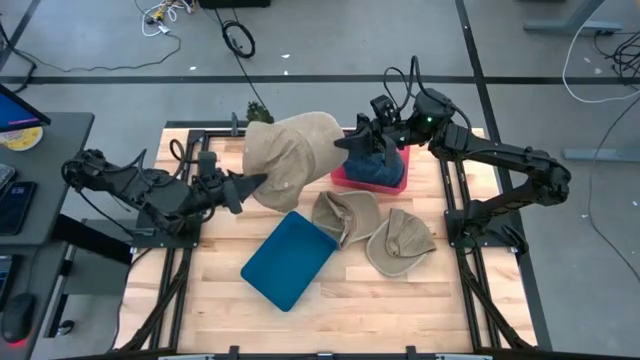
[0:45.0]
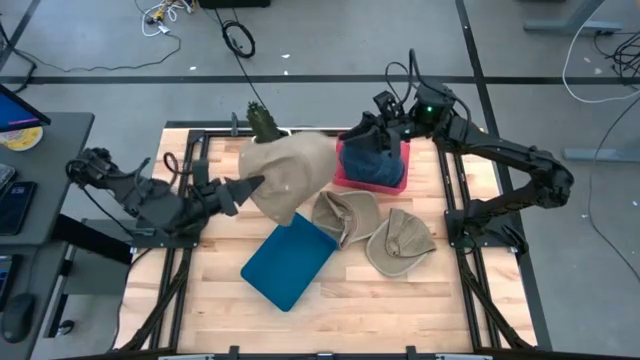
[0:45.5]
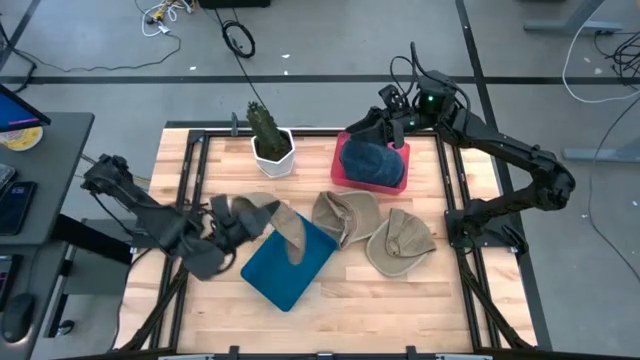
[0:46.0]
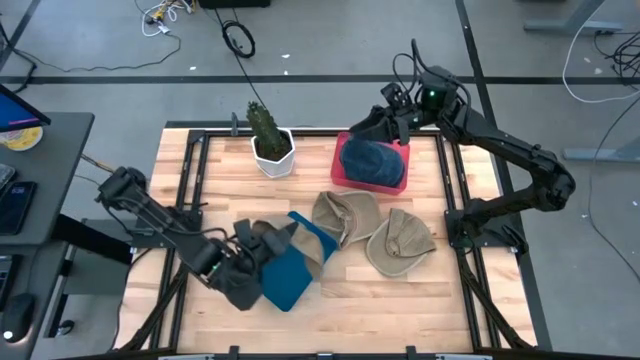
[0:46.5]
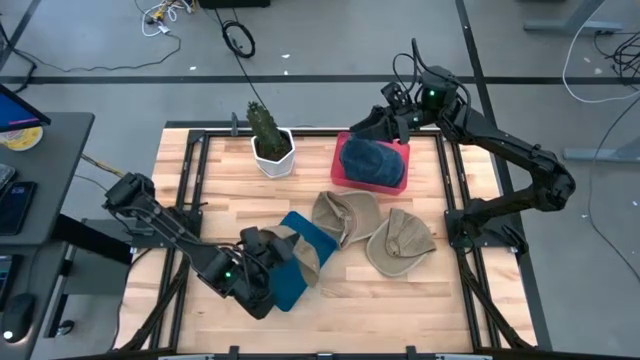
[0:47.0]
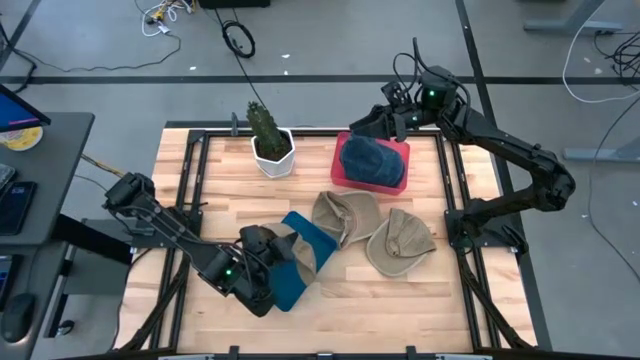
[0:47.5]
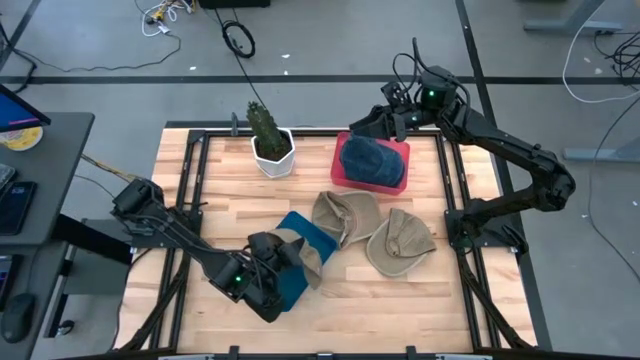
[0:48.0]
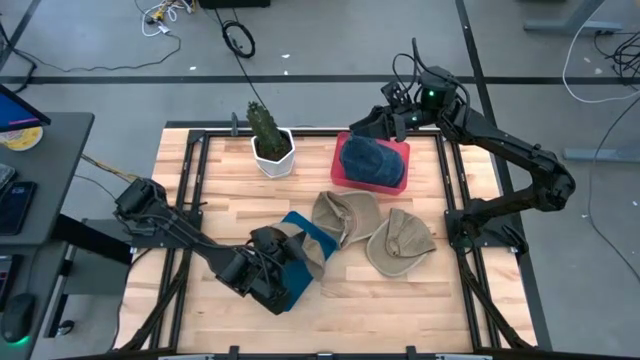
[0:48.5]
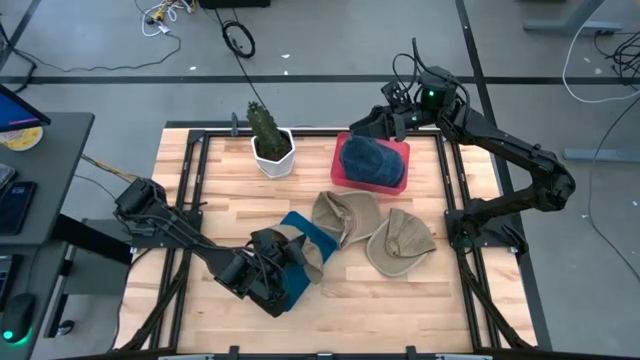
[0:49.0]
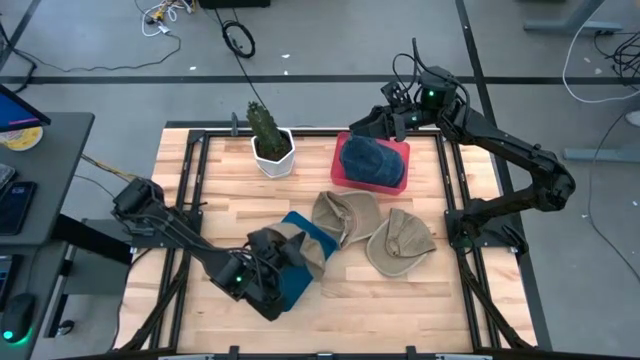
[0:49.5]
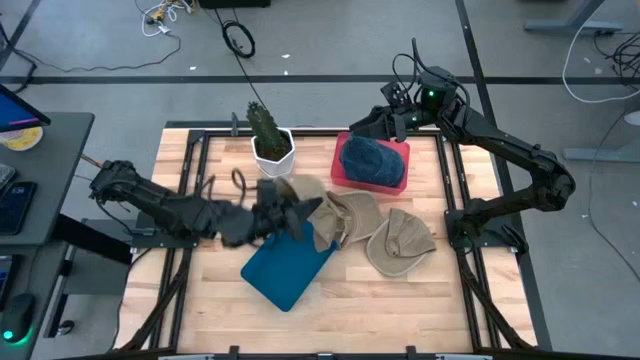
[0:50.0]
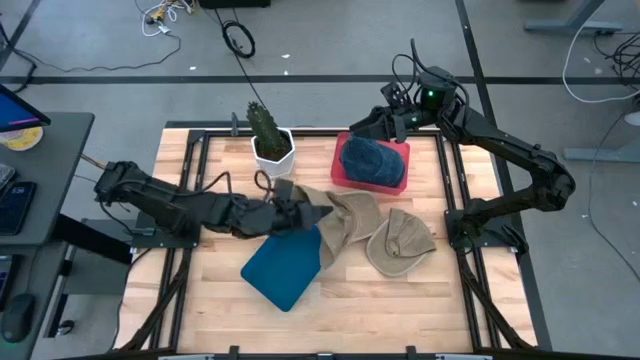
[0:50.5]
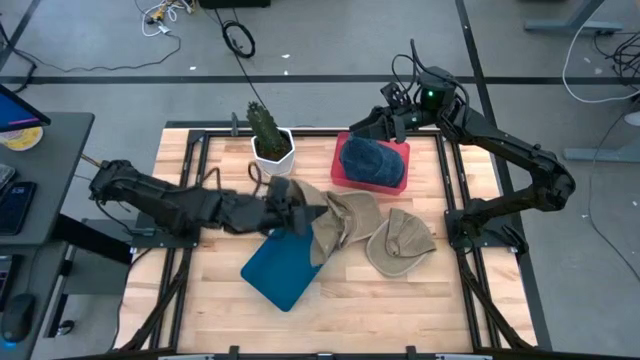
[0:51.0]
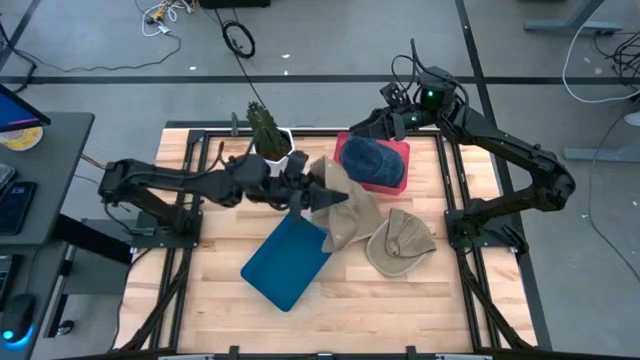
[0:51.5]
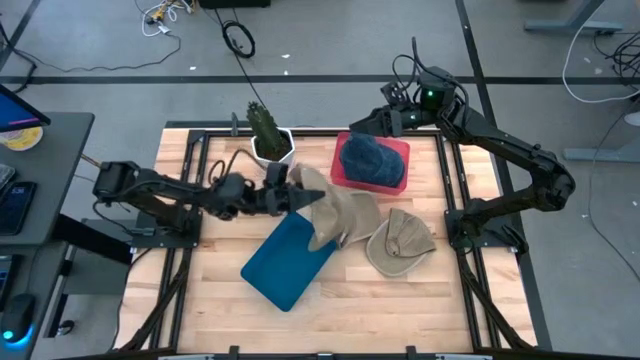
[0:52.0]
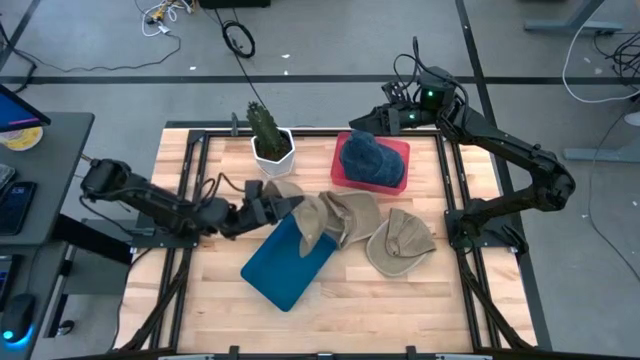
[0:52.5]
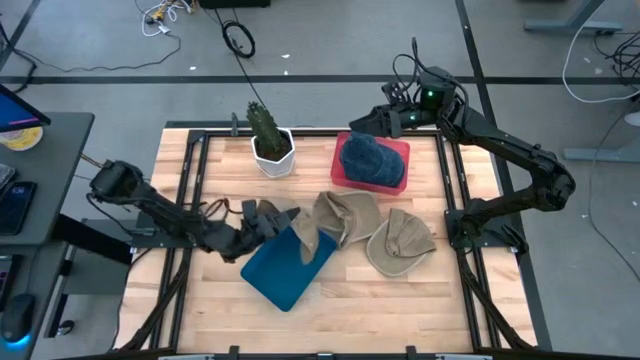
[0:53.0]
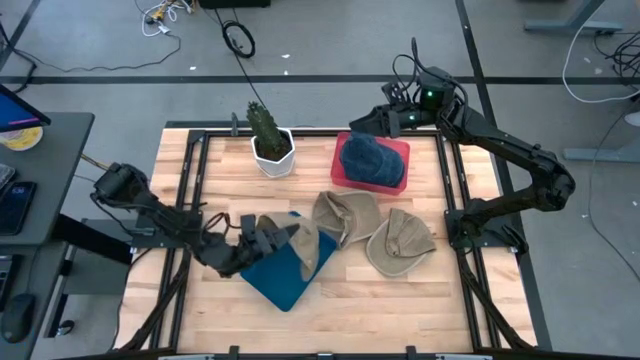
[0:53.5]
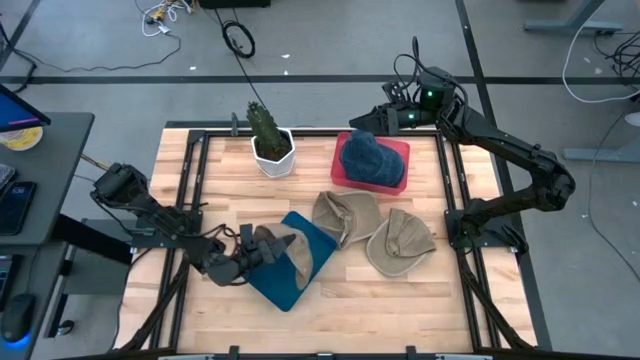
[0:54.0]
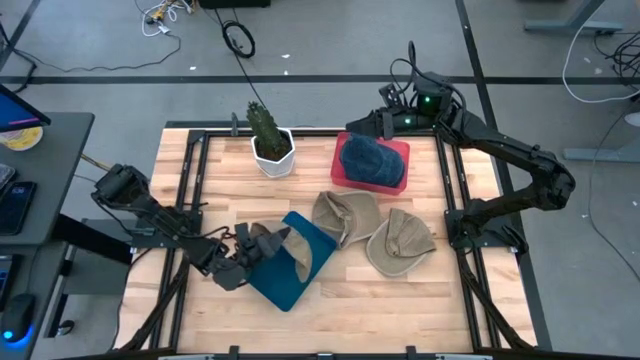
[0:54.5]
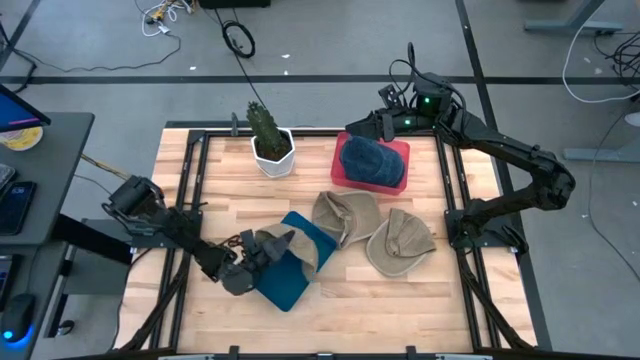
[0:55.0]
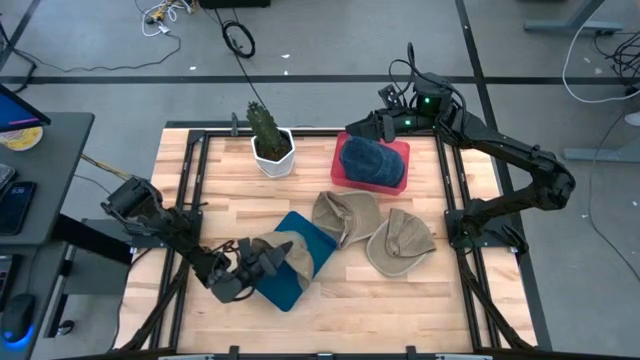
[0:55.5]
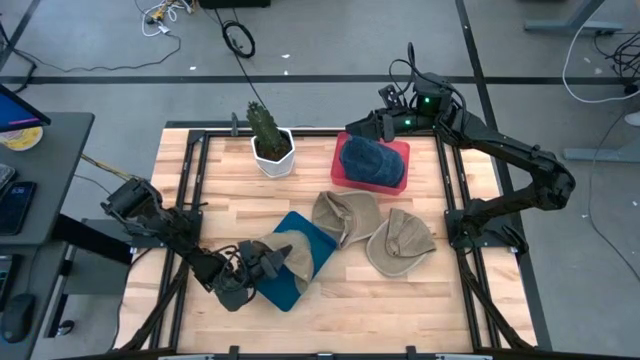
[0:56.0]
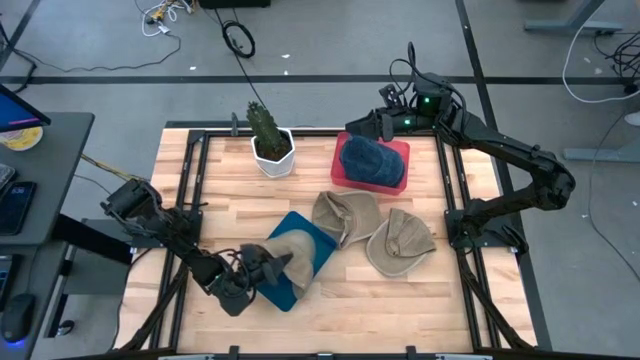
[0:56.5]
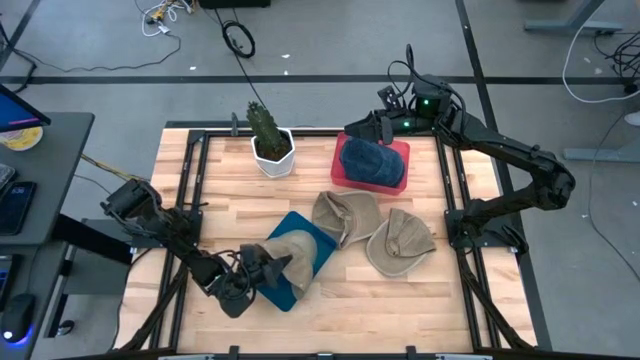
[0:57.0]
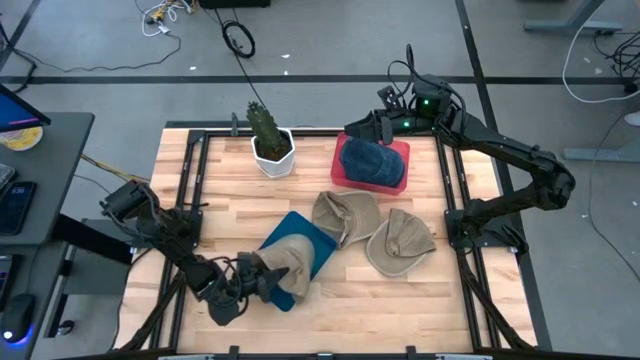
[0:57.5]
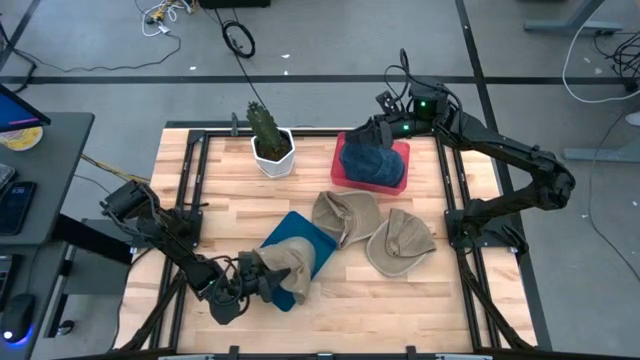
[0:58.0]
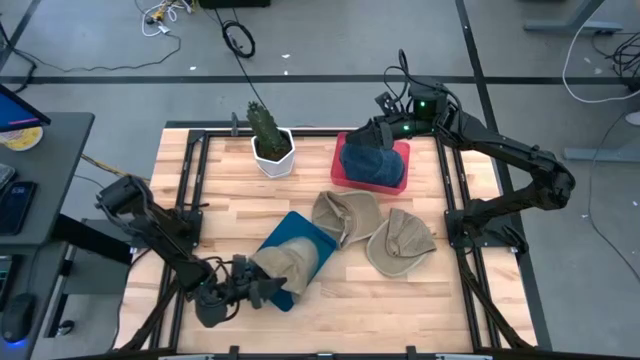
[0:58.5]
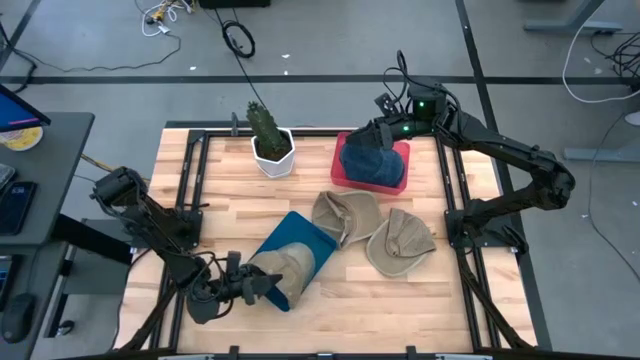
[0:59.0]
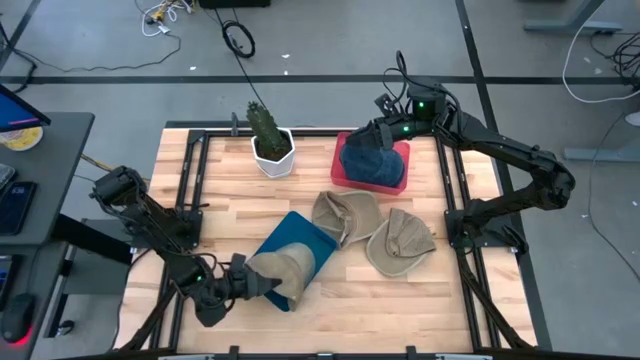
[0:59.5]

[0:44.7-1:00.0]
Task: Pick & Place hat
Put the left brown cap into the blue bin
